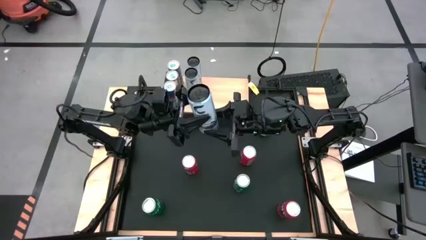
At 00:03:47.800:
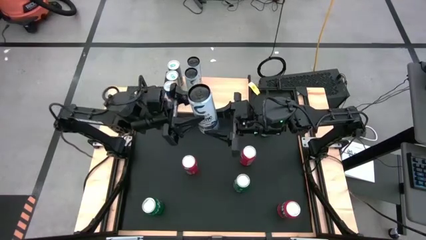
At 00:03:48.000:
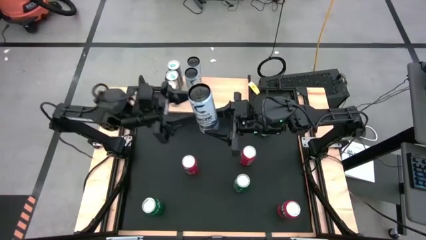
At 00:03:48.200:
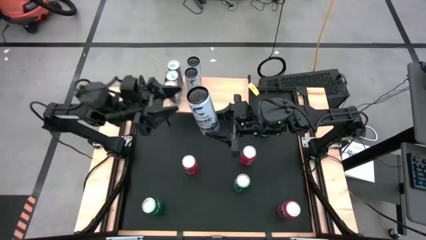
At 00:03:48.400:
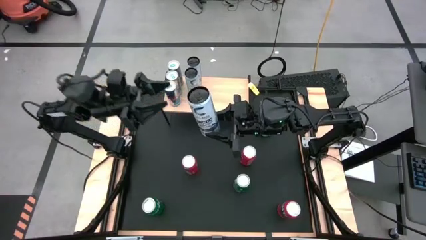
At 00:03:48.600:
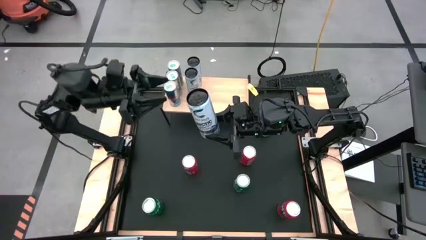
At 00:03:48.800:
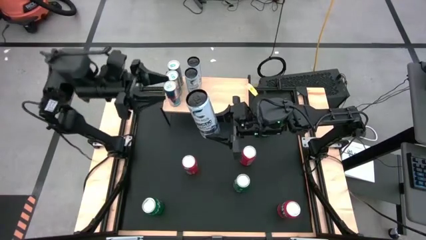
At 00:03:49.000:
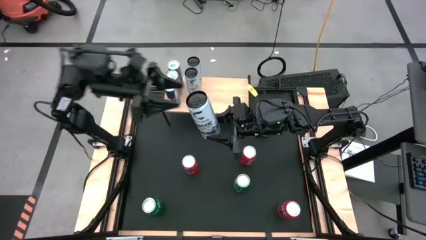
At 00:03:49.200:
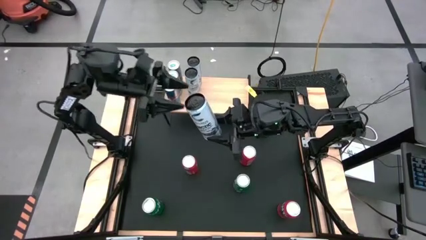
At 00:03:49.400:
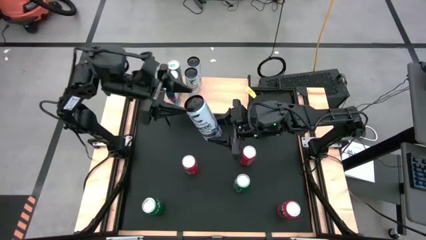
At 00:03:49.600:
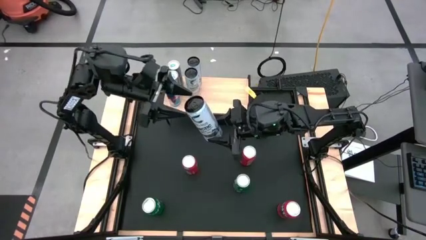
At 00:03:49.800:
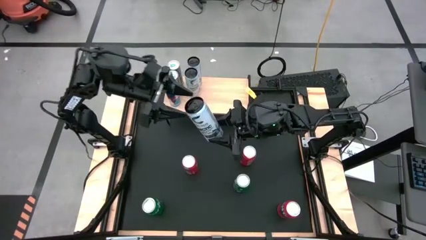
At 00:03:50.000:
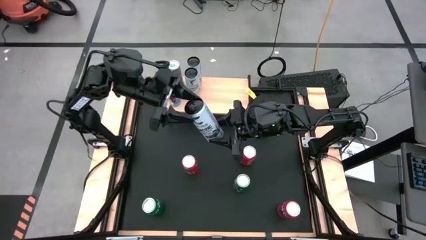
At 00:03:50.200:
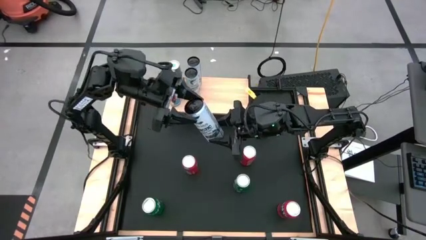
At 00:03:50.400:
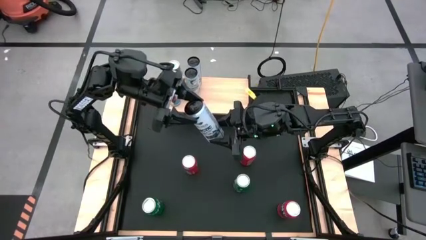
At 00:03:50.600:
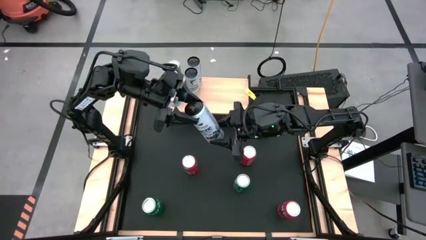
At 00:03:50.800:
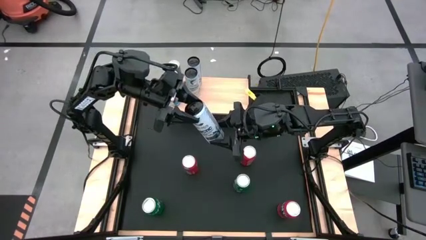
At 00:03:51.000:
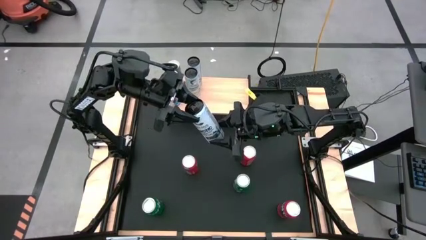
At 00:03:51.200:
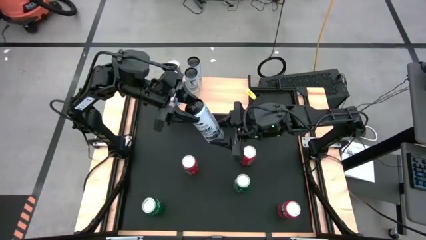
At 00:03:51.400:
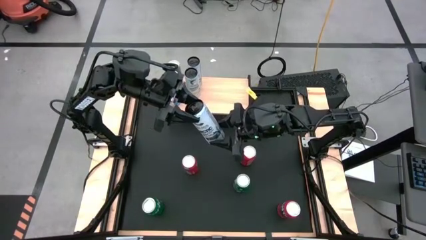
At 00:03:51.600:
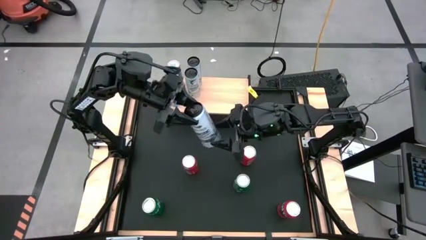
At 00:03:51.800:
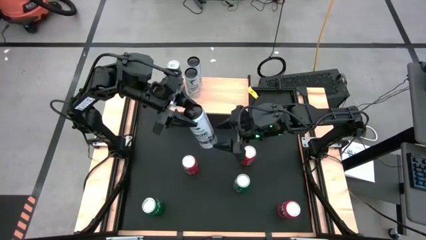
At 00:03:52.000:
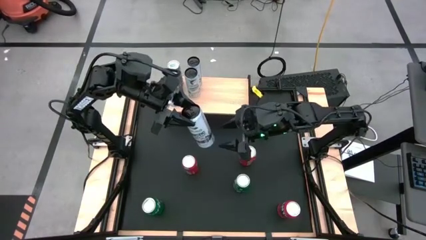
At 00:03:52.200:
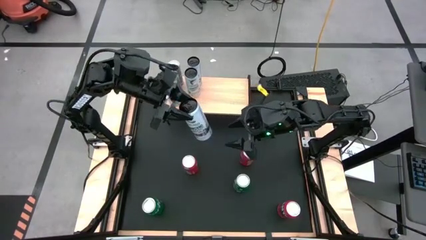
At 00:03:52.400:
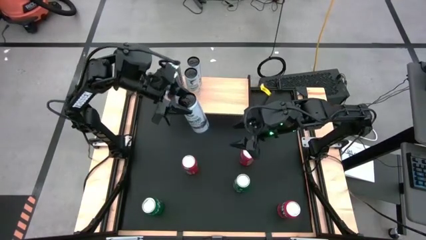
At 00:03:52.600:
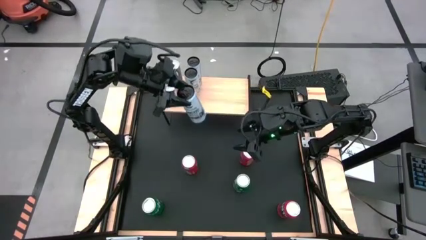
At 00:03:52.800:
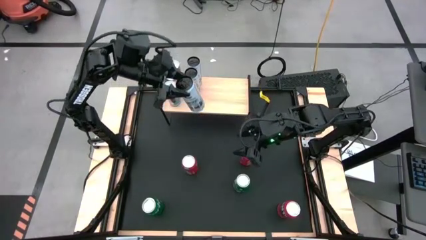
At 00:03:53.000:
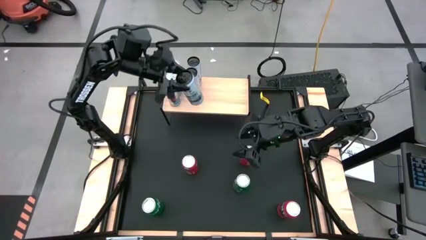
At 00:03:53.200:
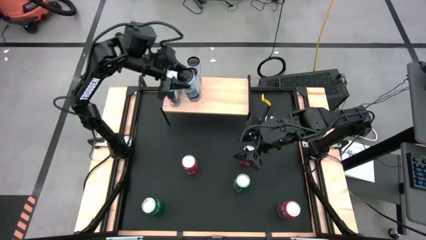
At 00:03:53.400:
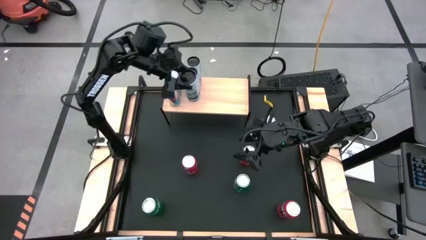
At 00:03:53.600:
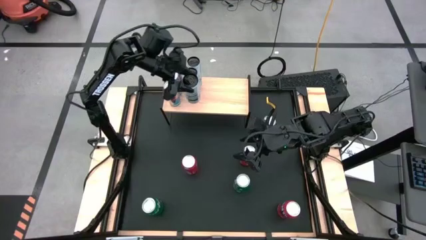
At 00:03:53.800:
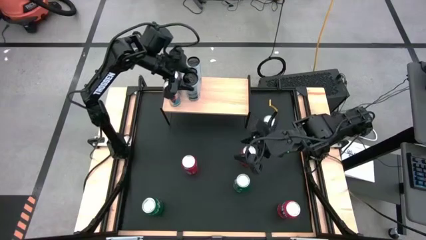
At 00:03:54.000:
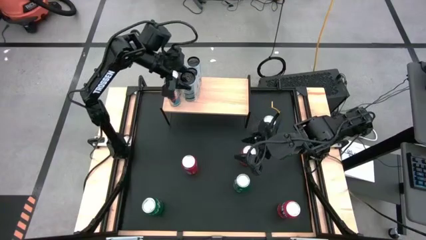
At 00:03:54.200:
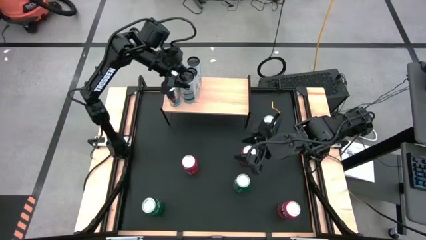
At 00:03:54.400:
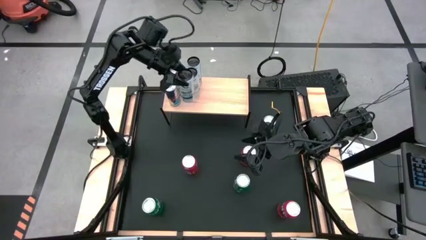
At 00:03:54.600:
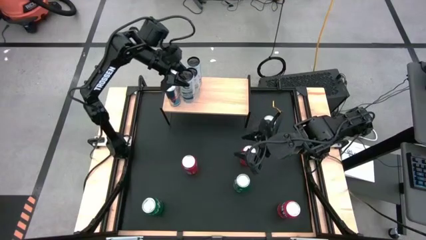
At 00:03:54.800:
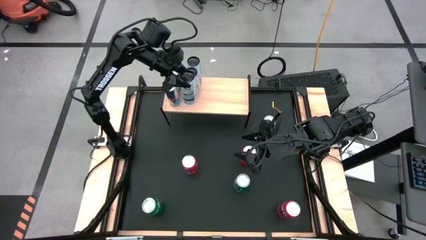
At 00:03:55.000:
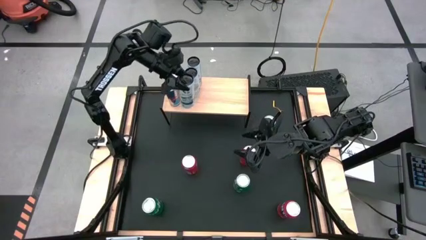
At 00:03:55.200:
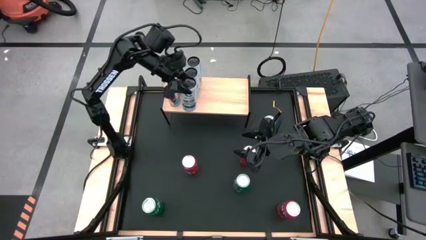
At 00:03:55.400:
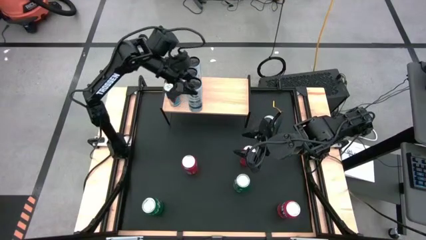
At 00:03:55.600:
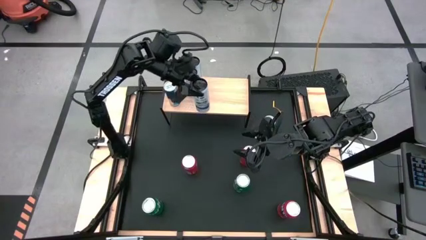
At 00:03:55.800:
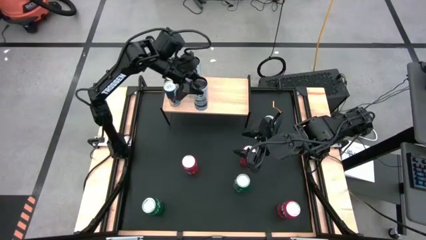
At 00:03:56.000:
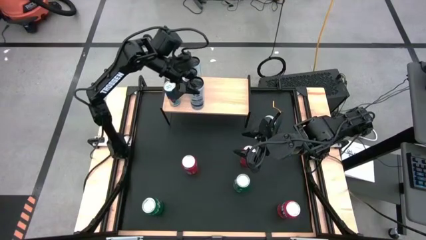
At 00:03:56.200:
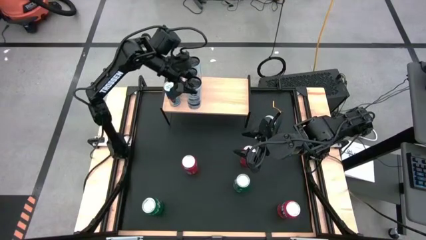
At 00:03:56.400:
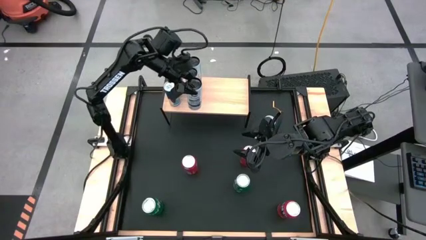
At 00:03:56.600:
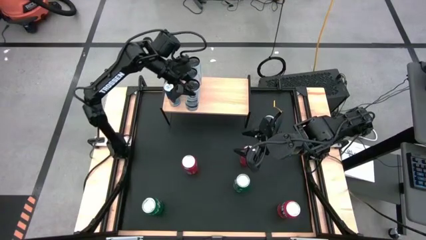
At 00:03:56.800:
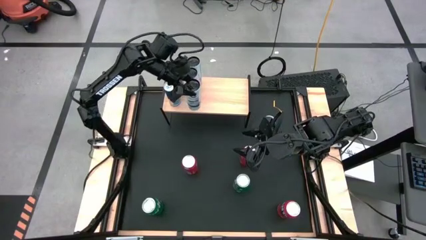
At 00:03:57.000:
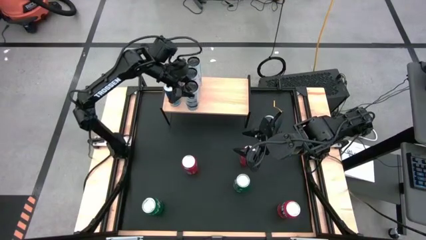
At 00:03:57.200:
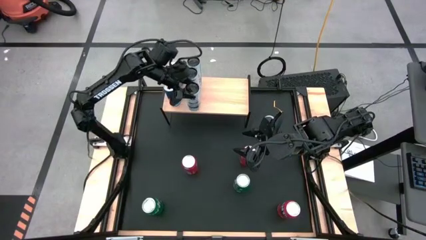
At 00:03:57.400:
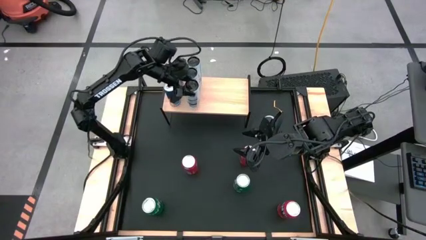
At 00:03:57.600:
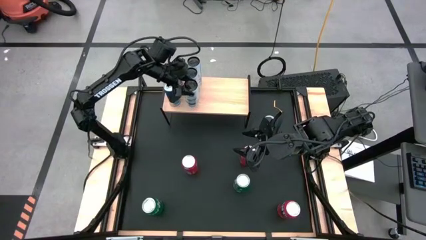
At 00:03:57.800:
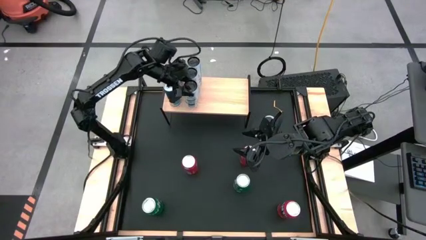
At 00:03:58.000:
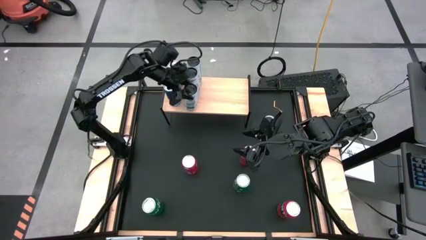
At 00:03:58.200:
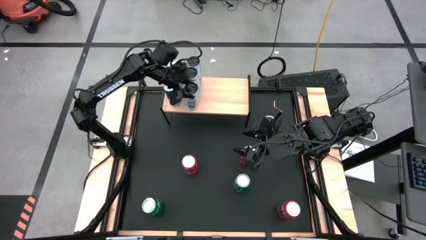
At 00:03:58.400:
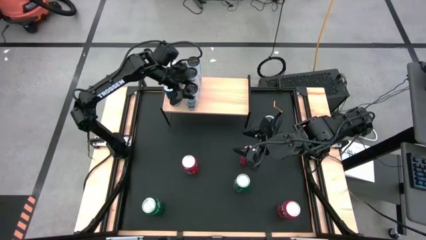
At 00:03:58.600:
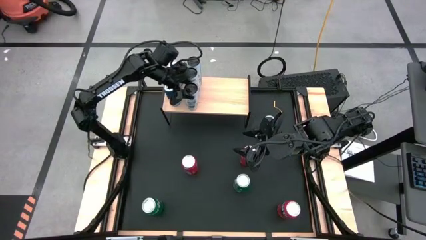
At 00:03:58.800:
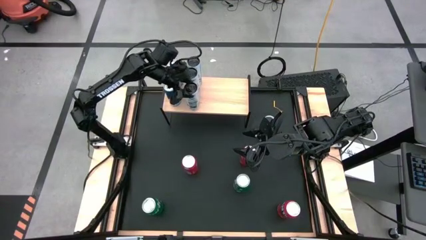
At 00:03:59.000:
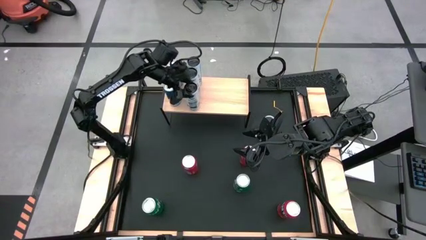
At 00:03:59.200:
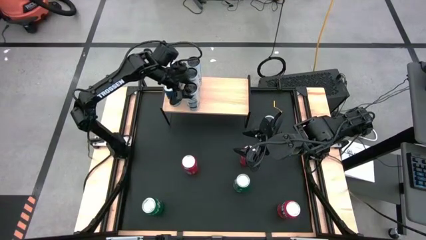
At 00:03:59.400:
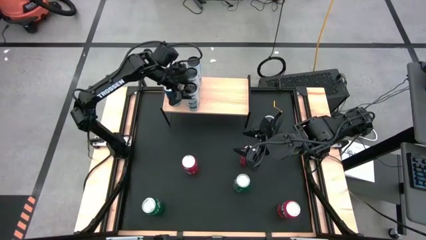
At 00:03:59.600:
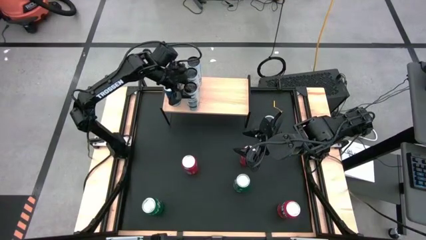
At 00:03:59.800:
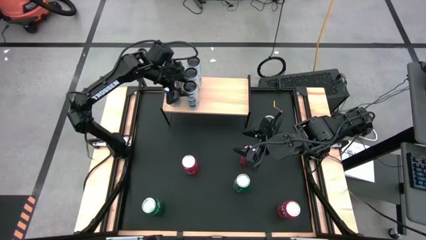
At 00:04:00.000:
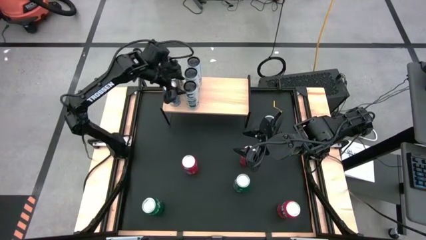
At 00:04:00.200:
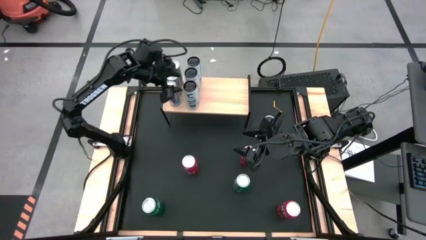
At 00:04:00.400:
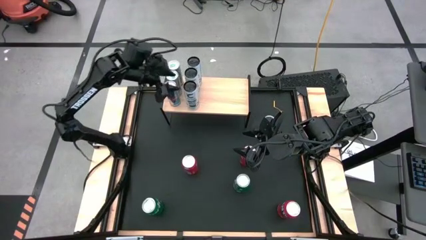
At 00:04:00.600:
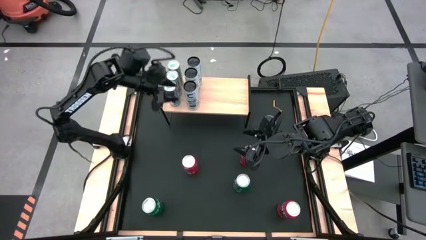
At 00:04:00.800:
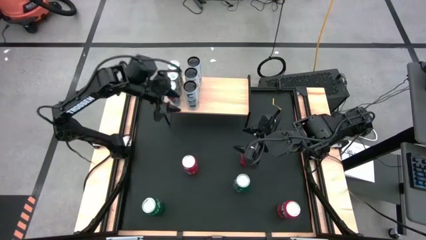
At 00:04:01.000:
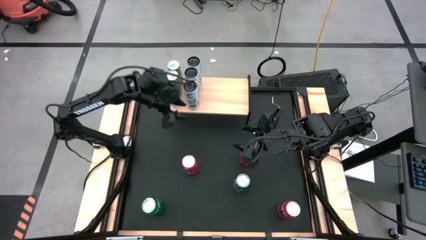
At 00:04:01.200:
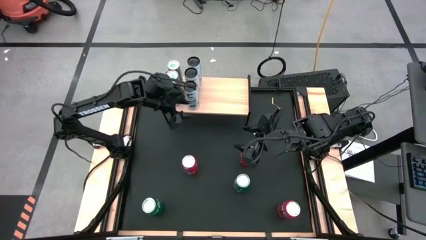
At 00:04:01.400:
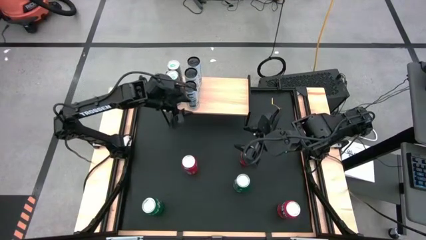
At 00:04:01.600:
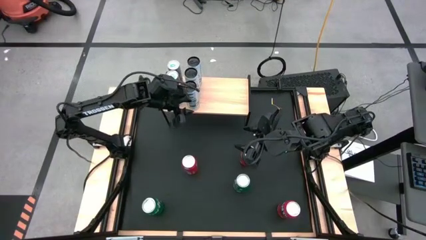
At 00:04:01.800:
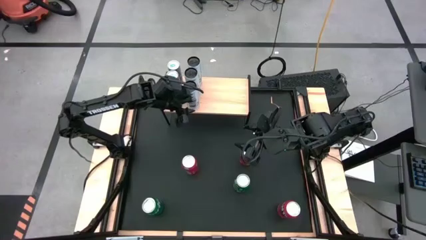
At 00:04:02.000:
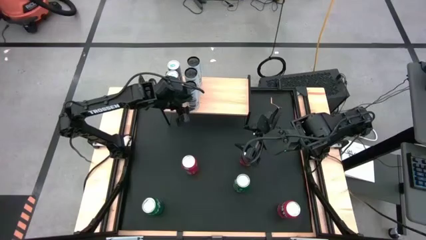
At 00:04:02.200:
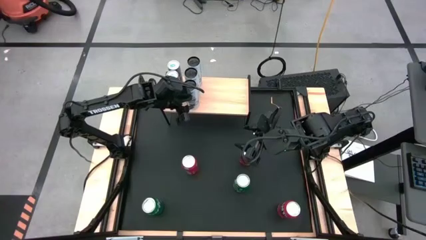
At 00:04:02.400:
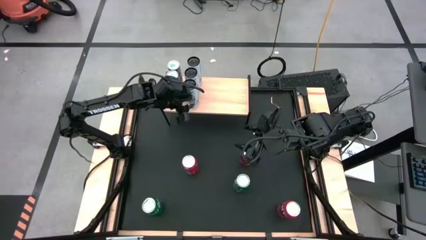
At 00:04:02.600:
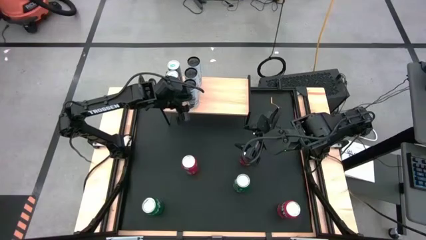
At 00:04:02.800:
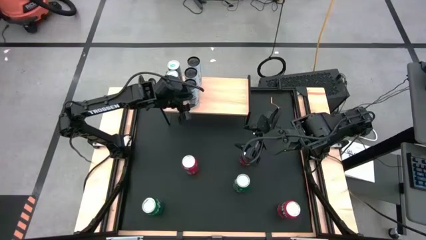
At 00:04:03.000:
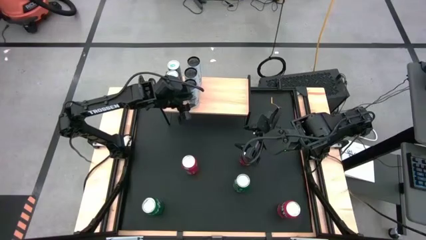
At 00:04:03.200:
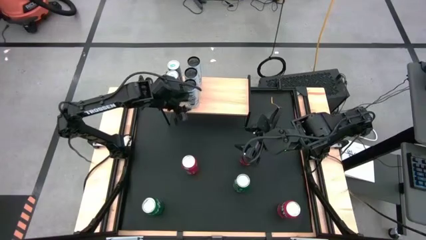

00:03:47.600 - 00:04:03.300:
Task: Place canned beverage on shelf
Put the white-blue soda can on the shelf
